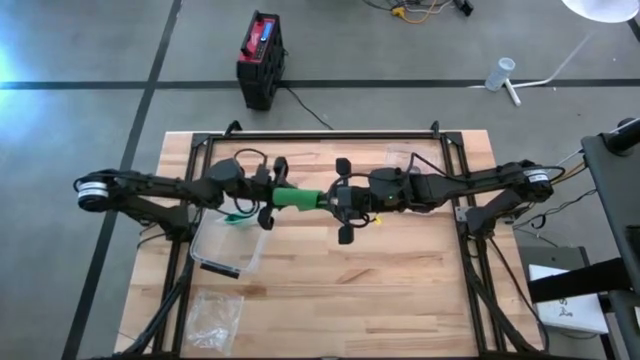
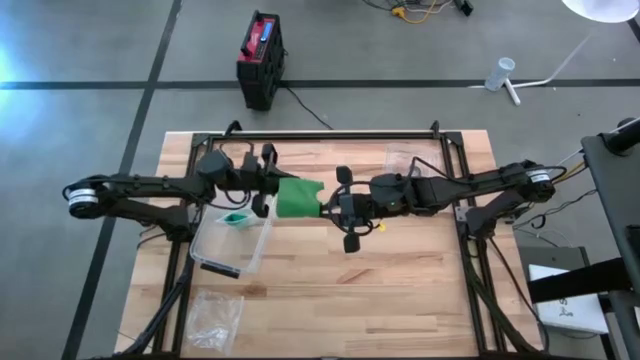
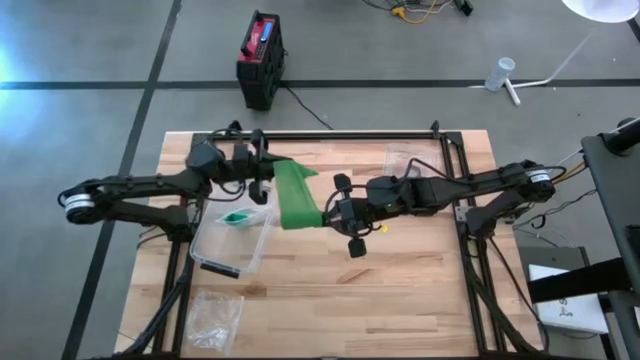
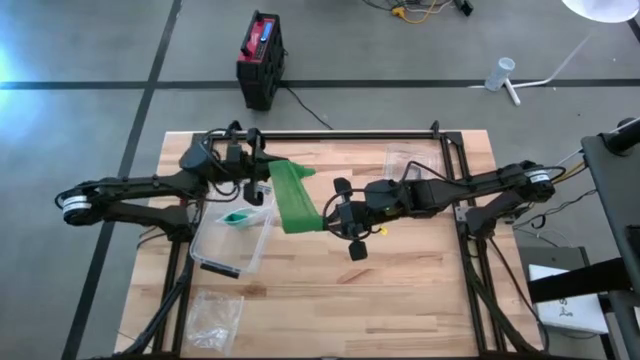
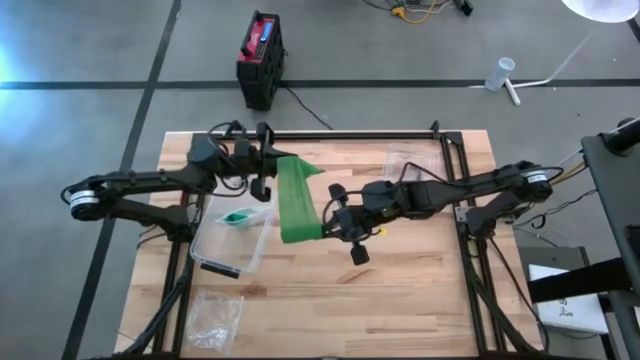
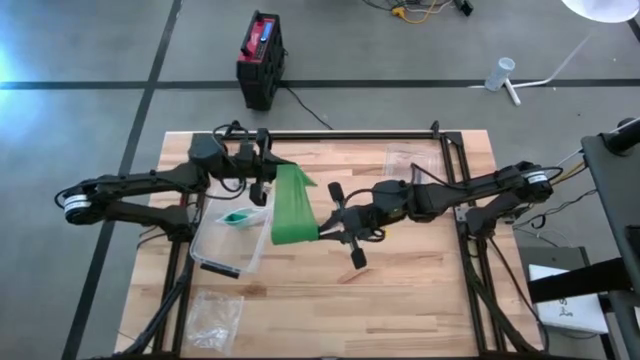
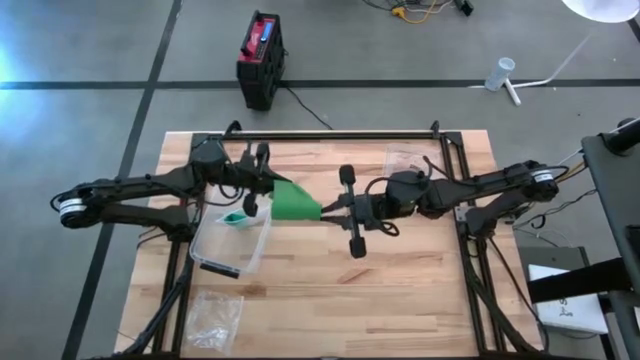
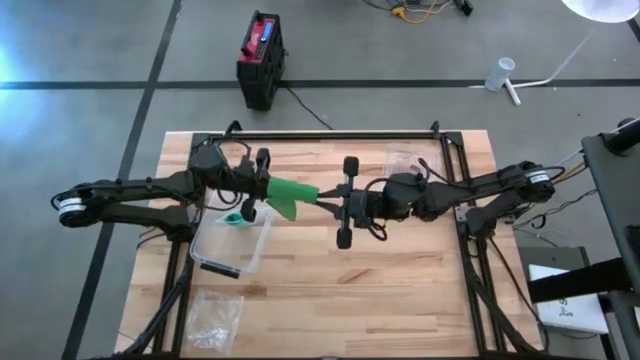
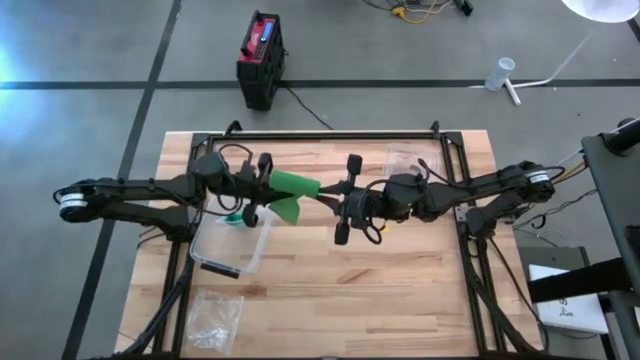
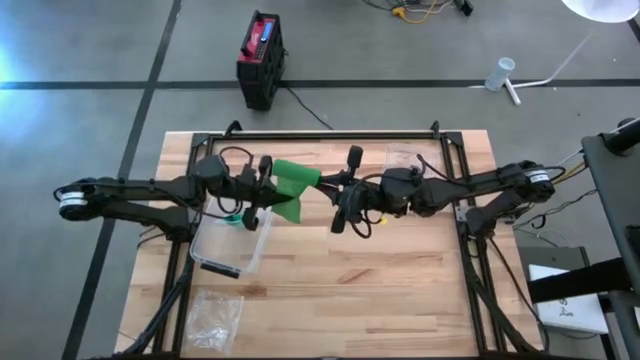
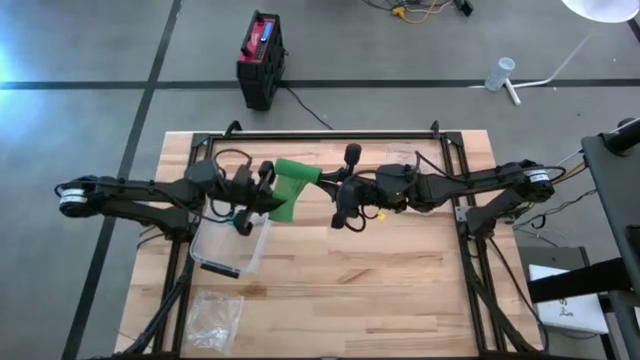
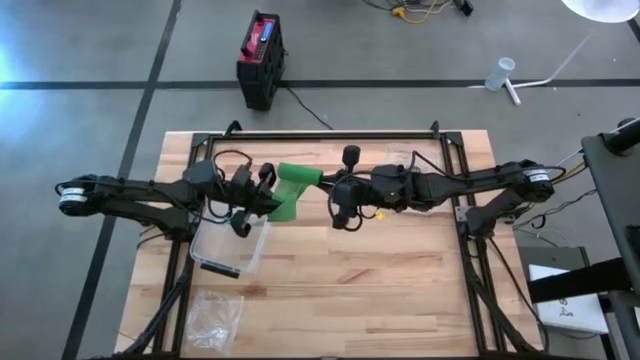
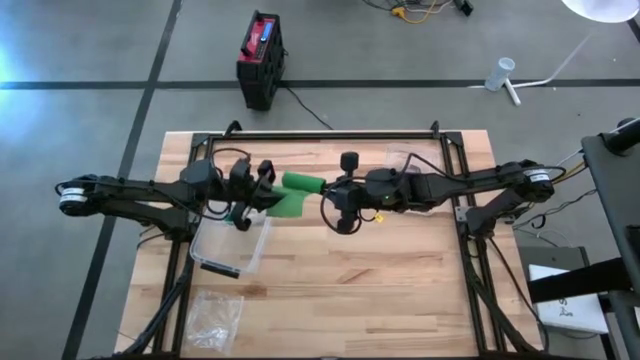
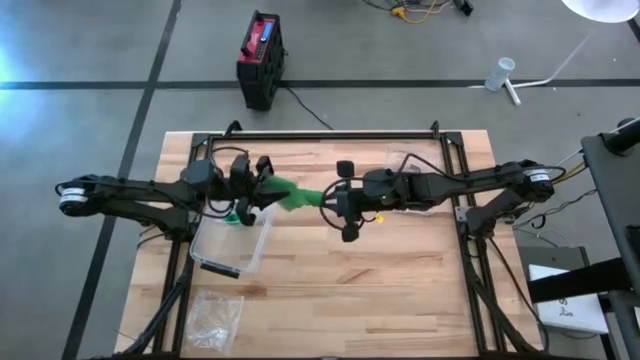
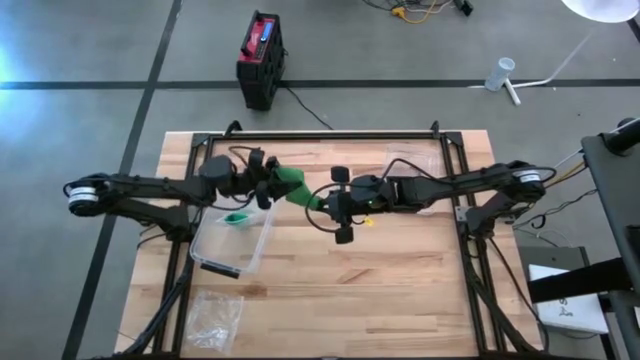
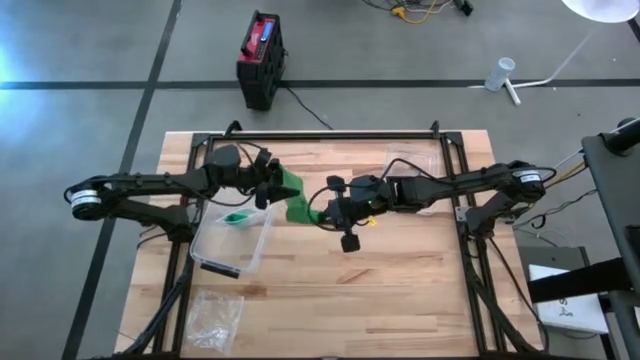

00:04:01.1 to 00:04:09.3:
Task: Roll bandage
Roll the dark green bandage

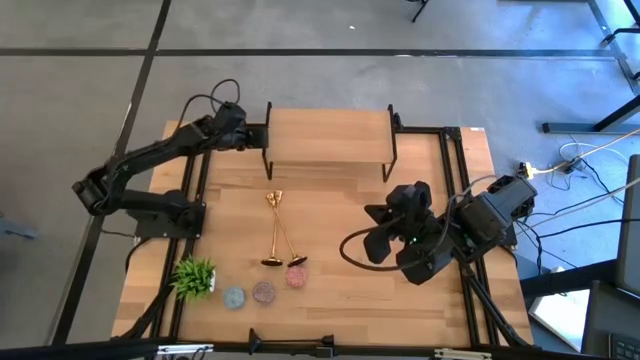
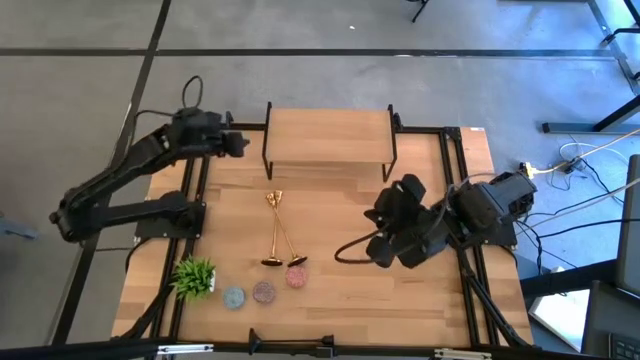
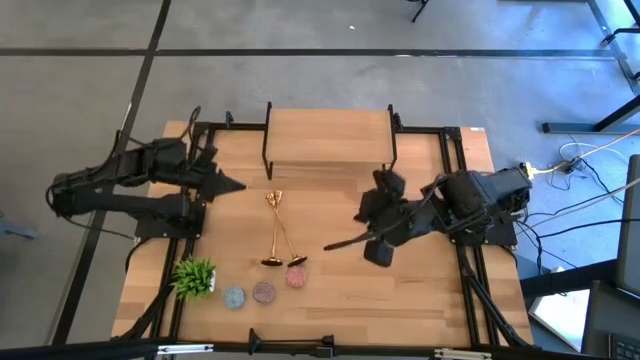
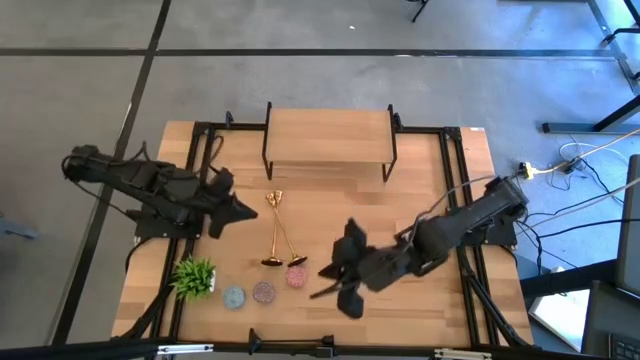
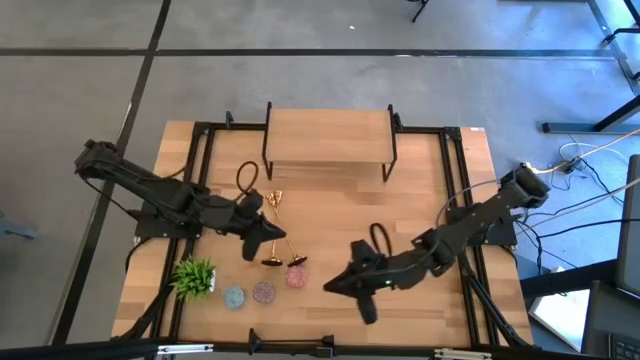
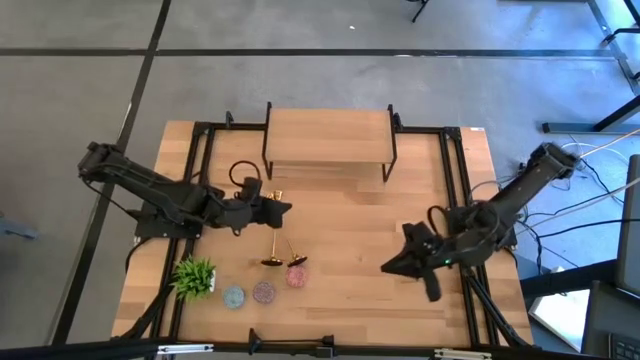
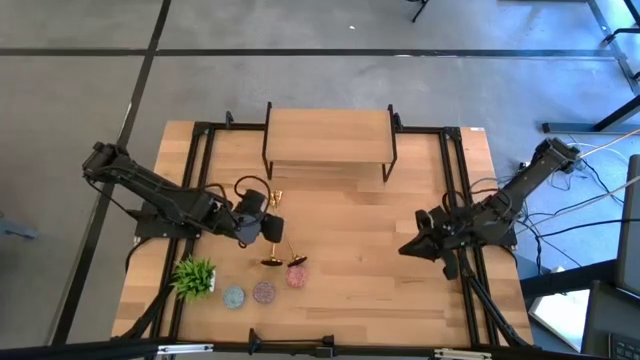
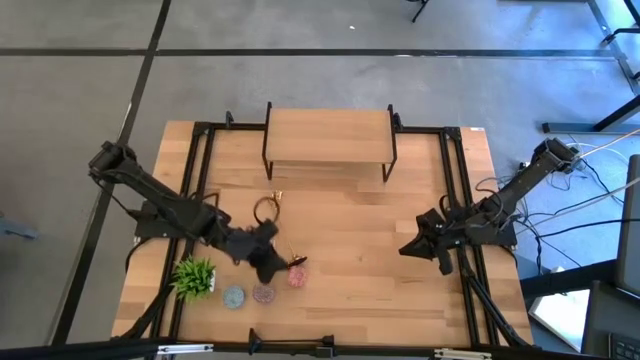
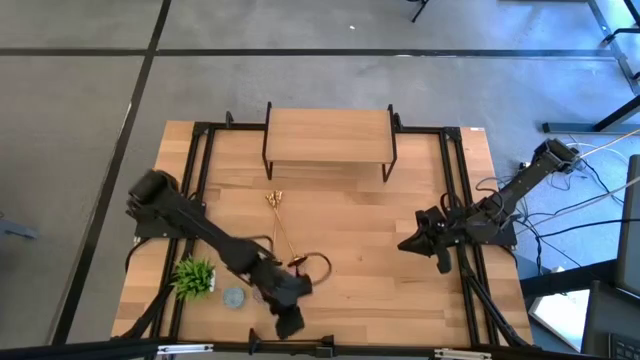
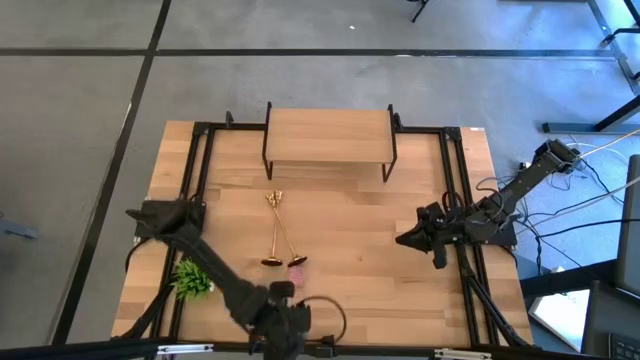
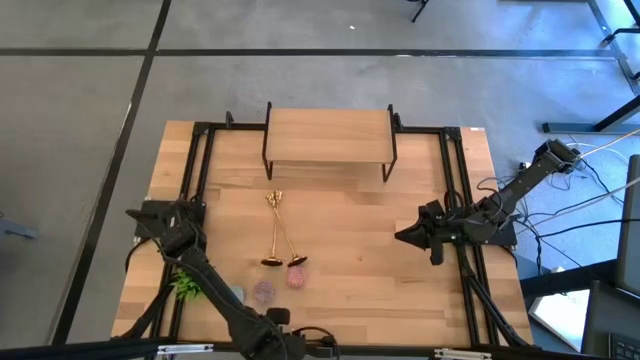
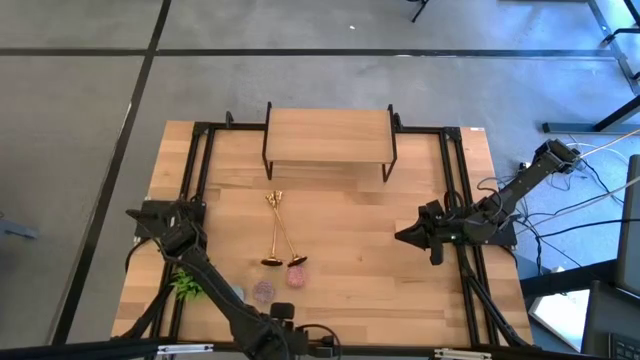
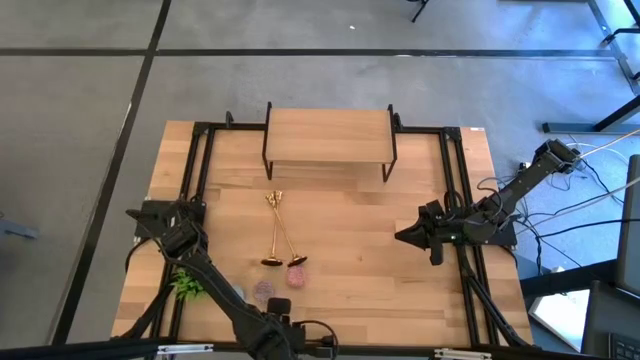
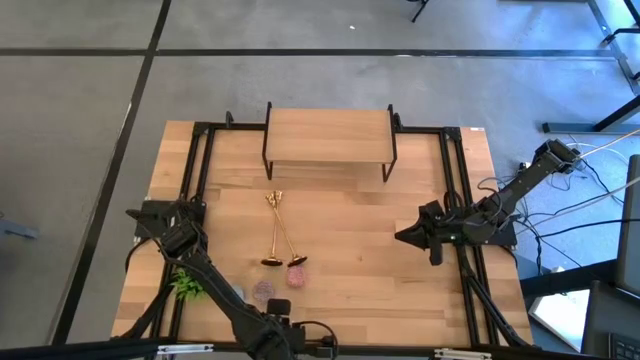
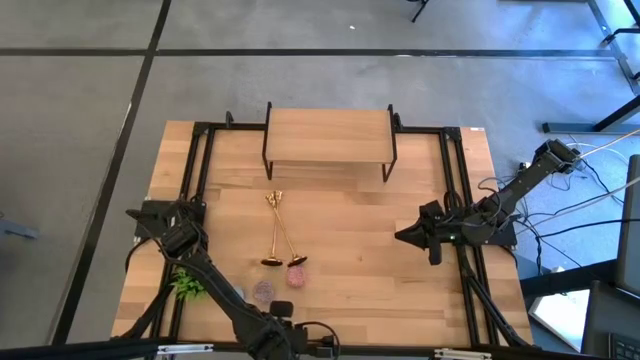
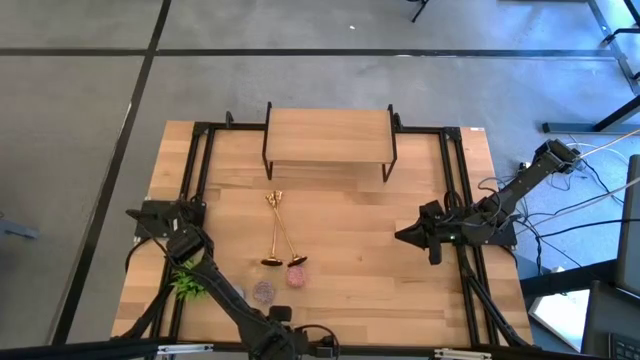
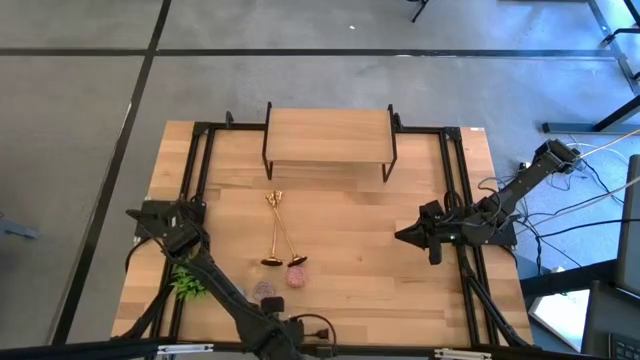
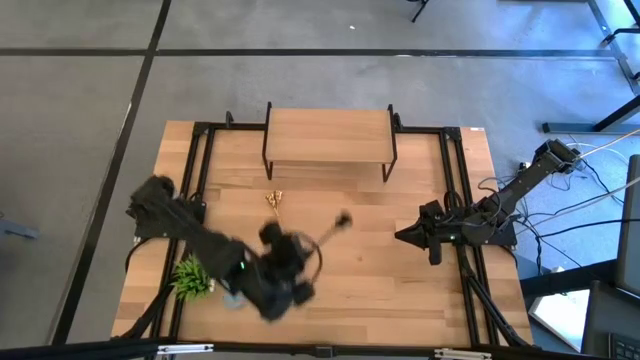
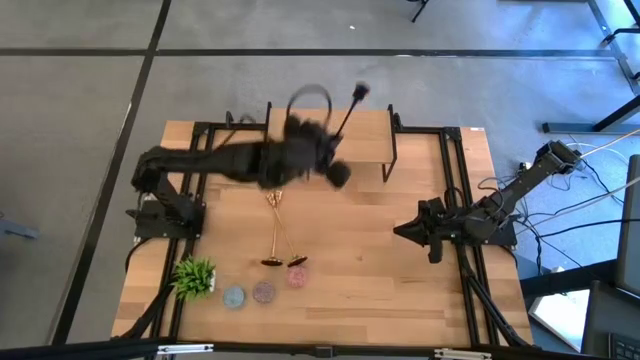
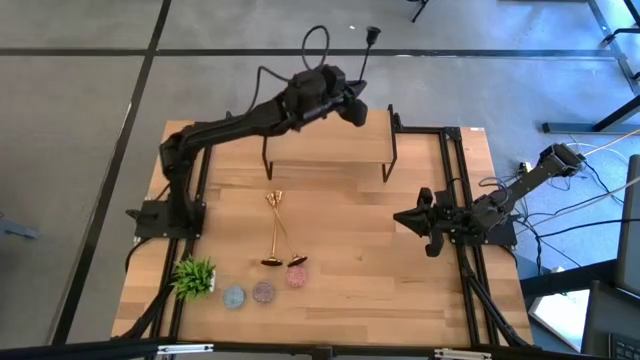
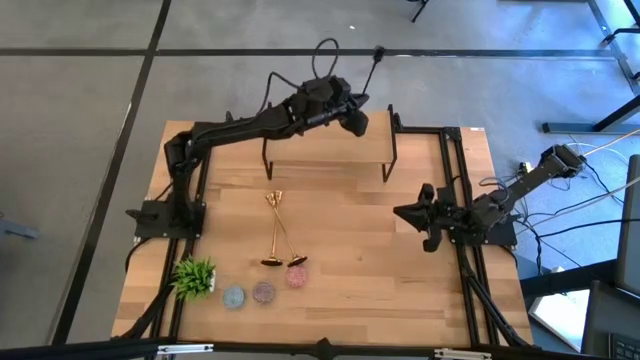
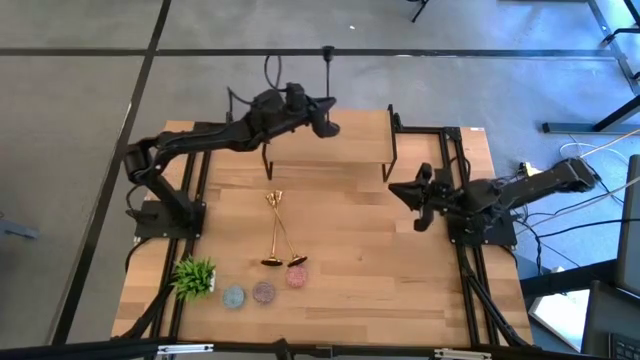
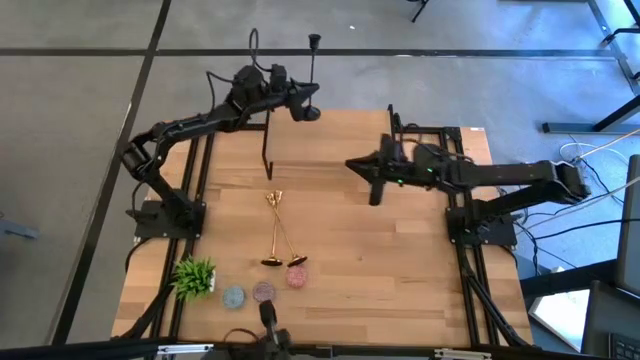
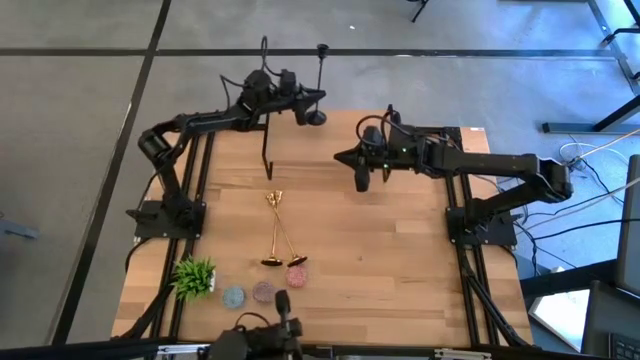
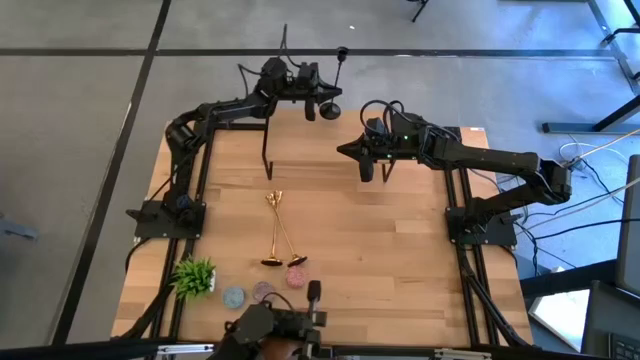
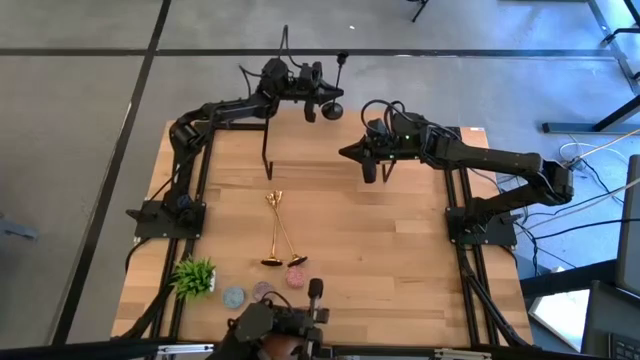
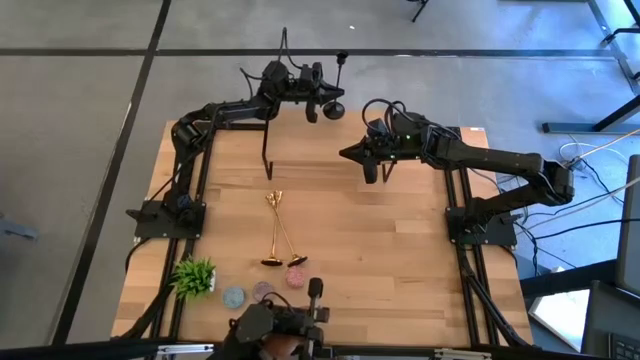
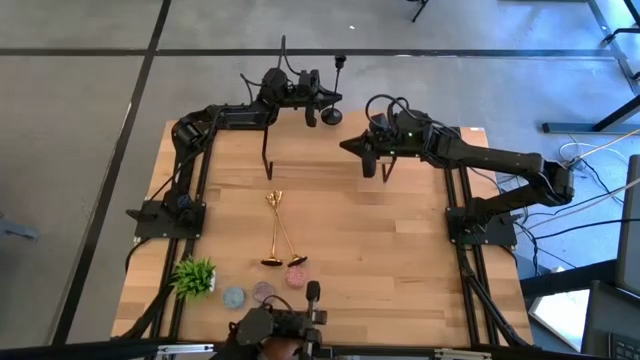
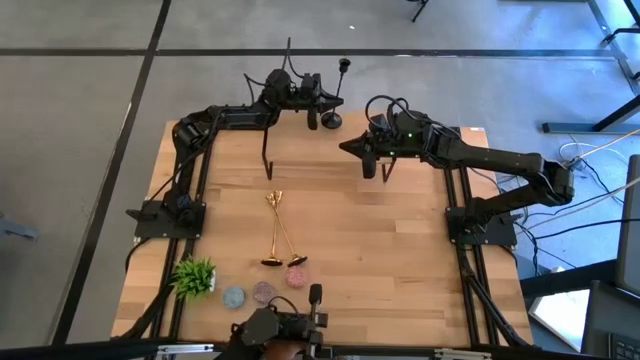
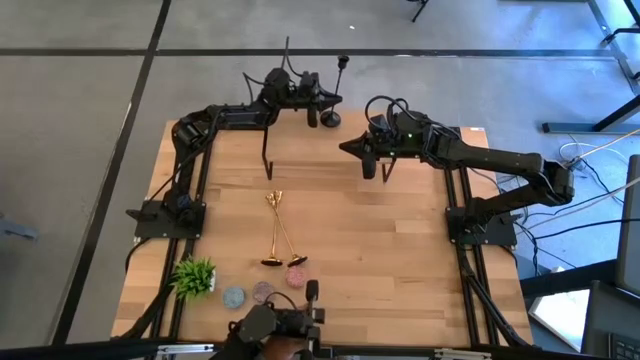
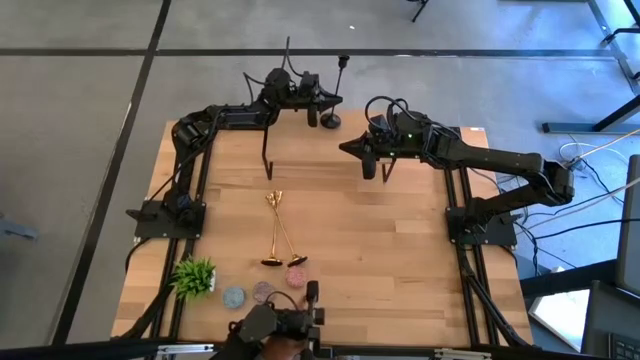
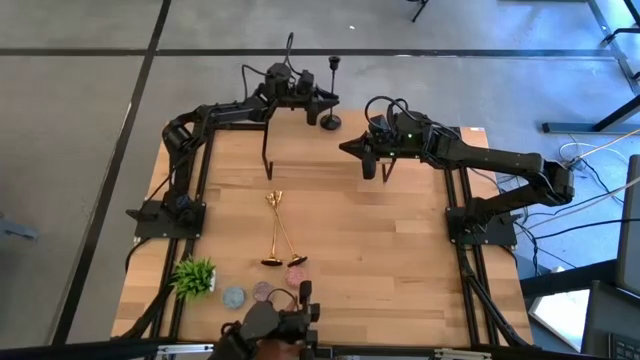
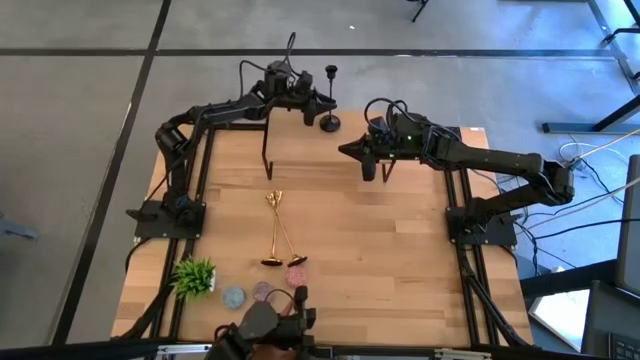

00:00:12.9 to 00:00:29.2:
Task: Pick & Place candle stick holders
Put the black candle holder on the shelf
